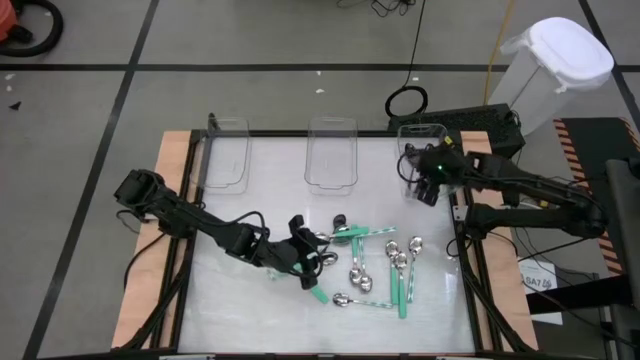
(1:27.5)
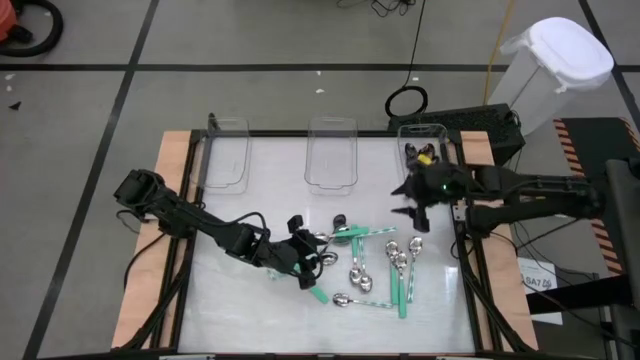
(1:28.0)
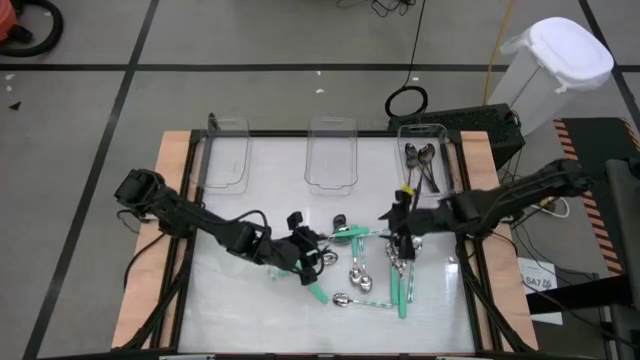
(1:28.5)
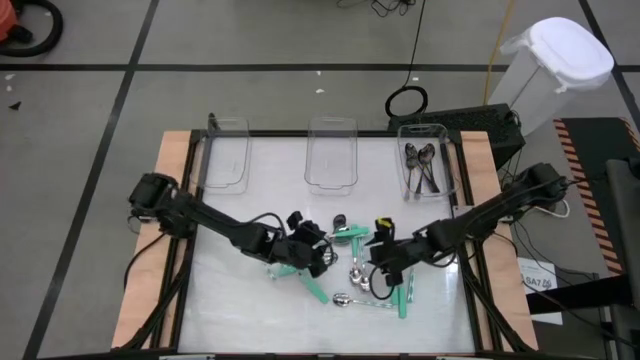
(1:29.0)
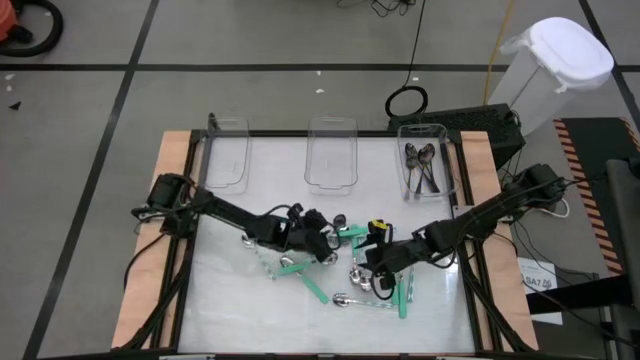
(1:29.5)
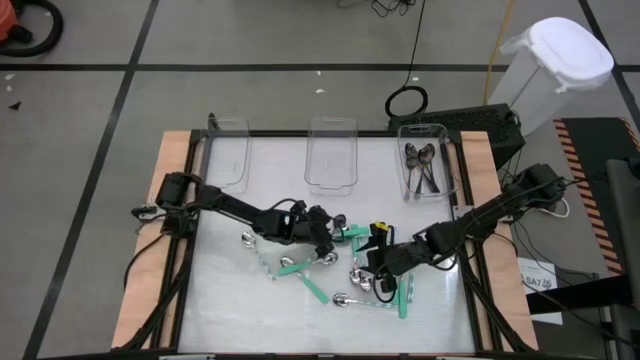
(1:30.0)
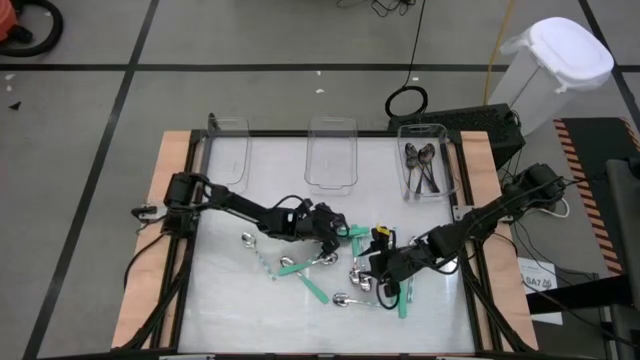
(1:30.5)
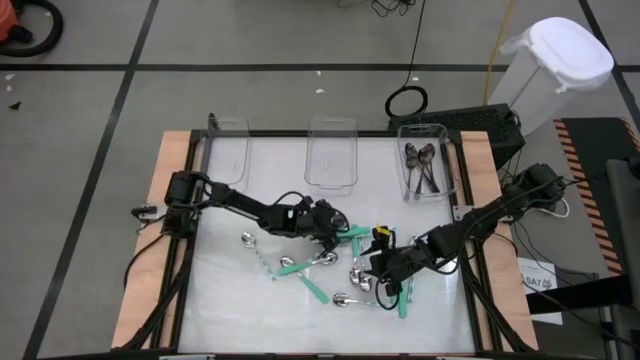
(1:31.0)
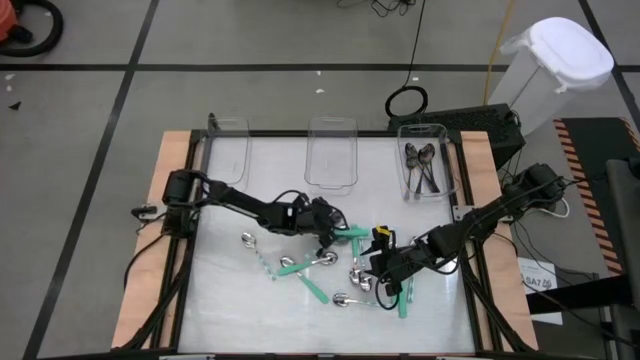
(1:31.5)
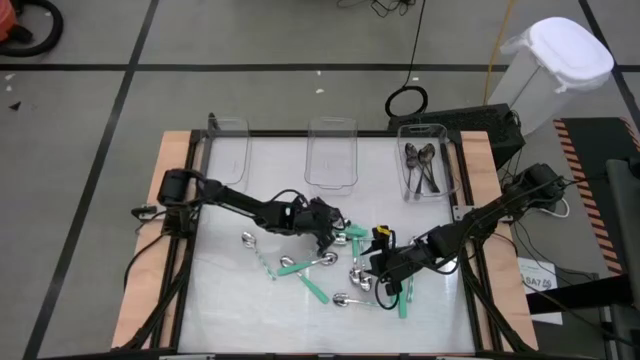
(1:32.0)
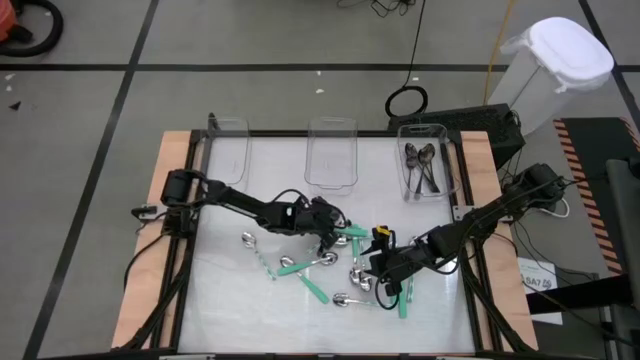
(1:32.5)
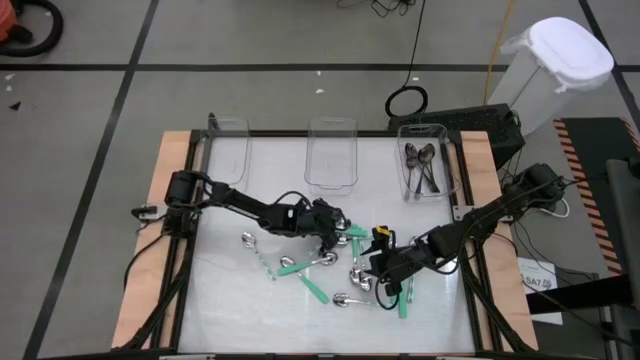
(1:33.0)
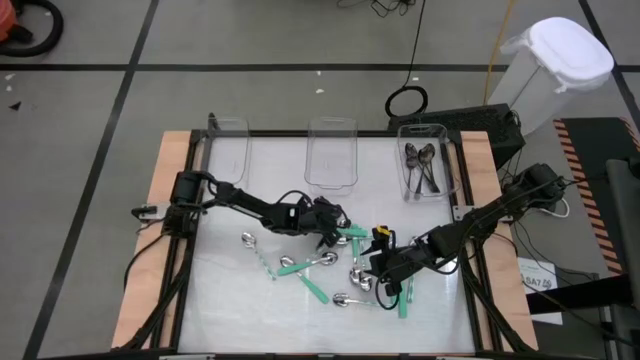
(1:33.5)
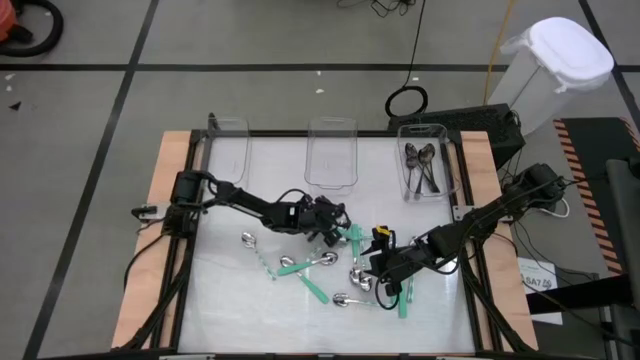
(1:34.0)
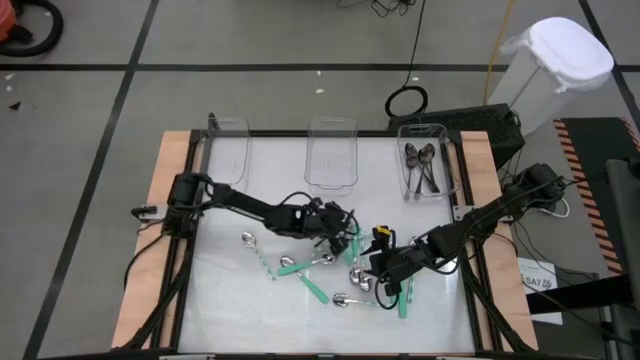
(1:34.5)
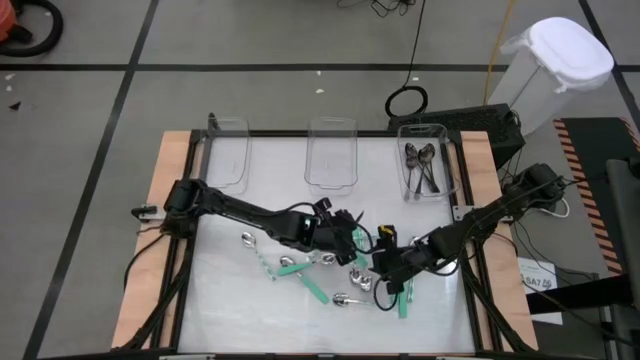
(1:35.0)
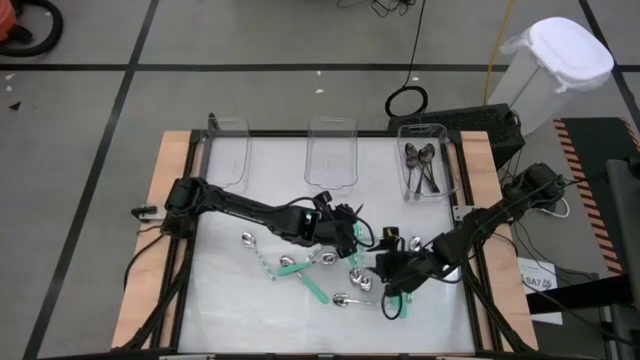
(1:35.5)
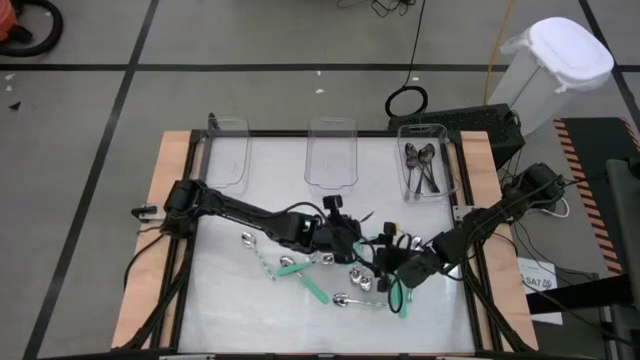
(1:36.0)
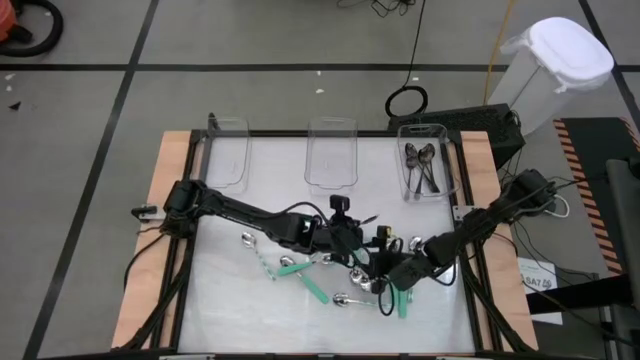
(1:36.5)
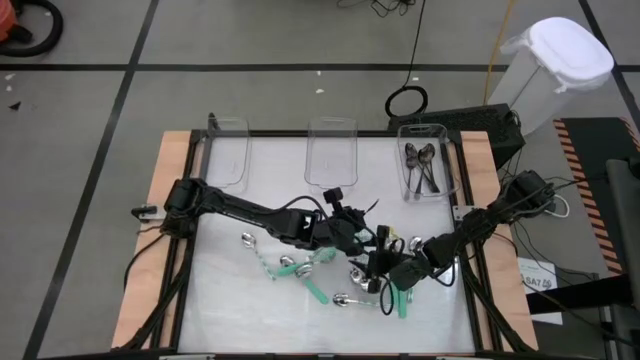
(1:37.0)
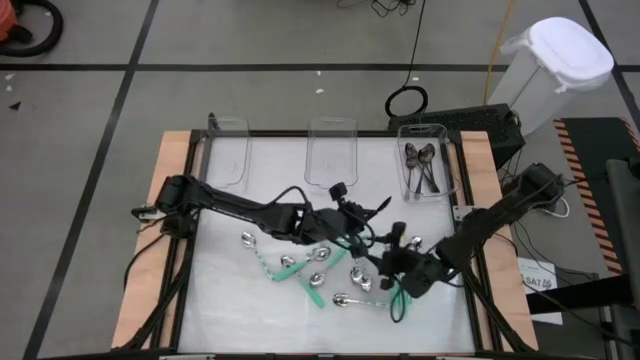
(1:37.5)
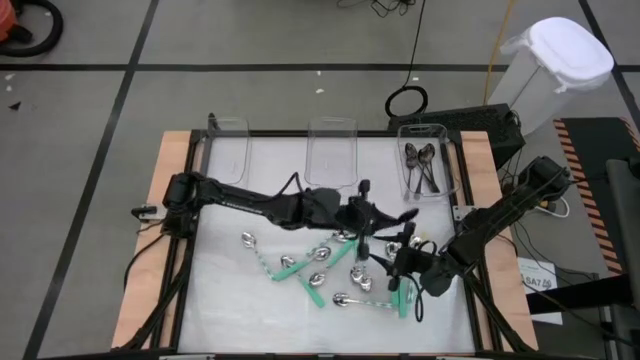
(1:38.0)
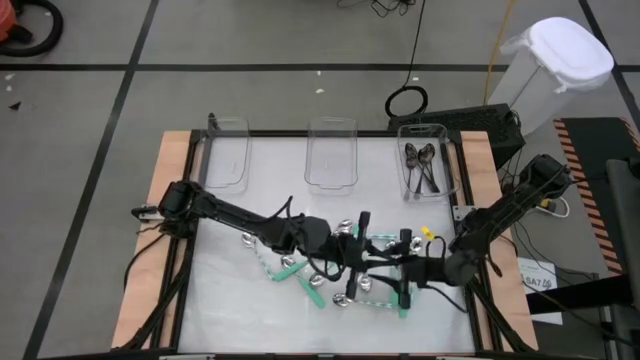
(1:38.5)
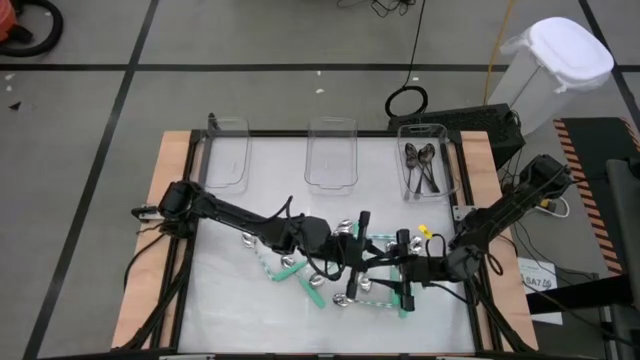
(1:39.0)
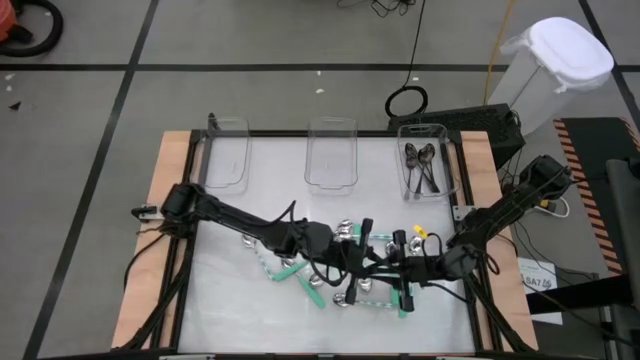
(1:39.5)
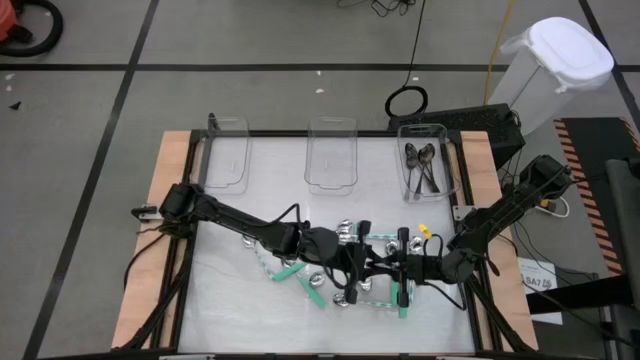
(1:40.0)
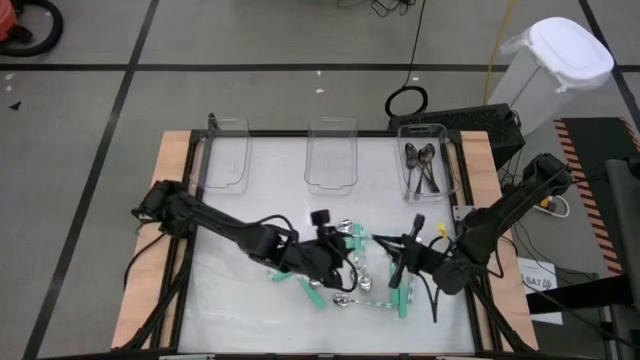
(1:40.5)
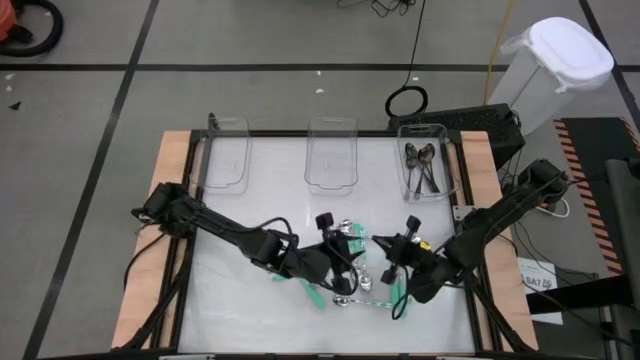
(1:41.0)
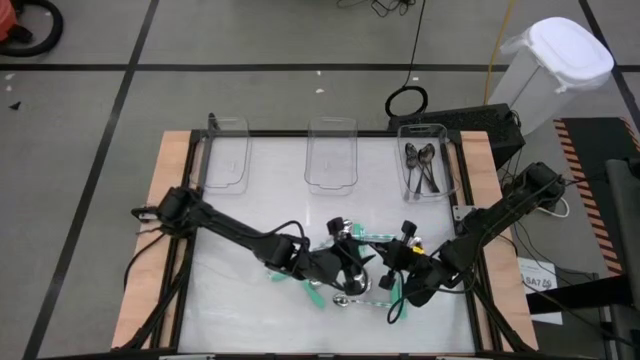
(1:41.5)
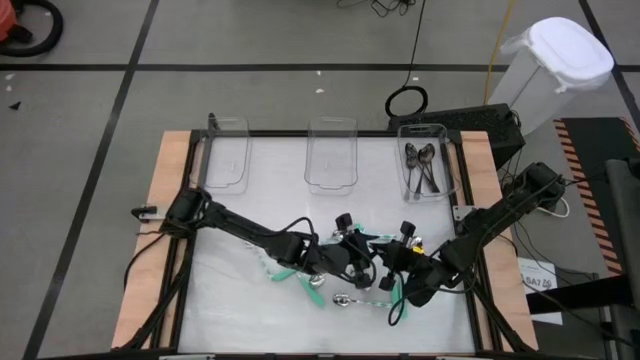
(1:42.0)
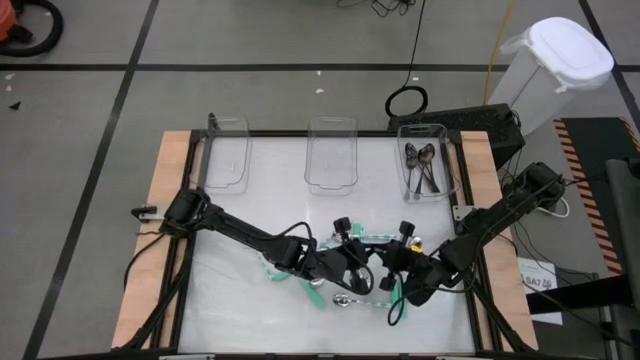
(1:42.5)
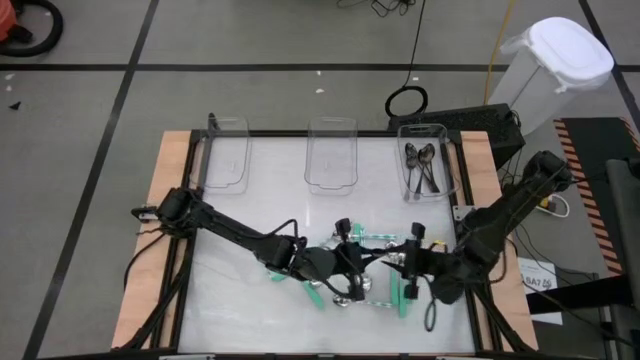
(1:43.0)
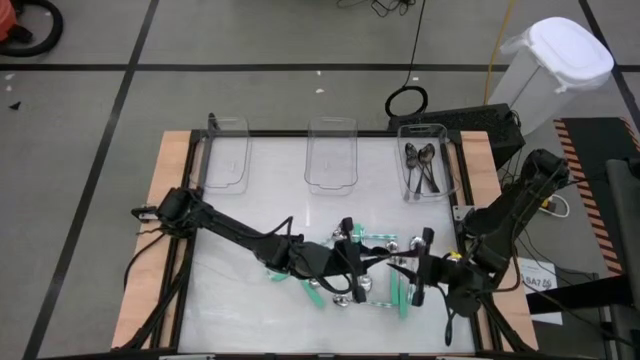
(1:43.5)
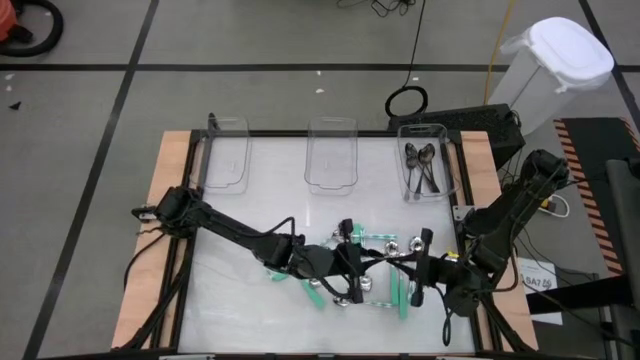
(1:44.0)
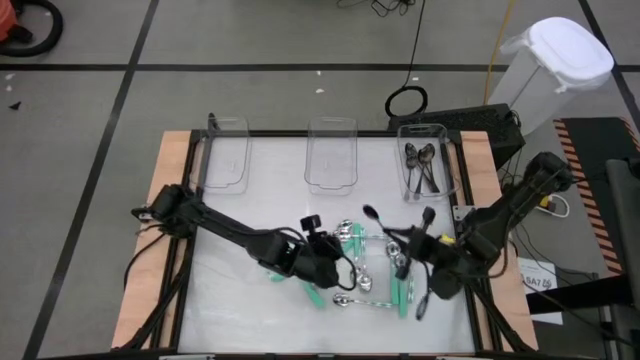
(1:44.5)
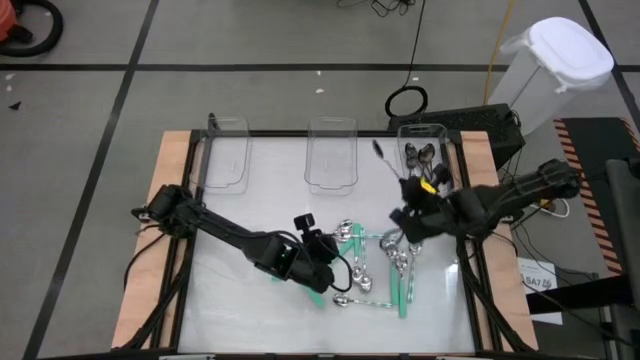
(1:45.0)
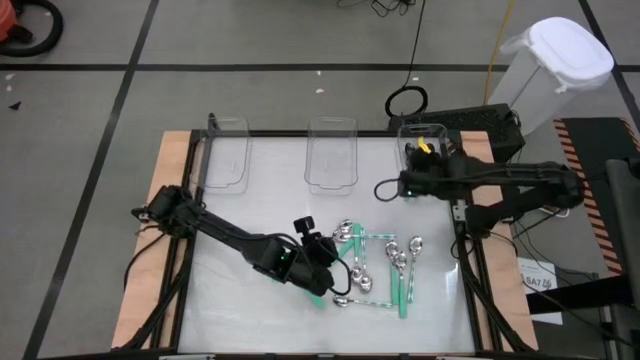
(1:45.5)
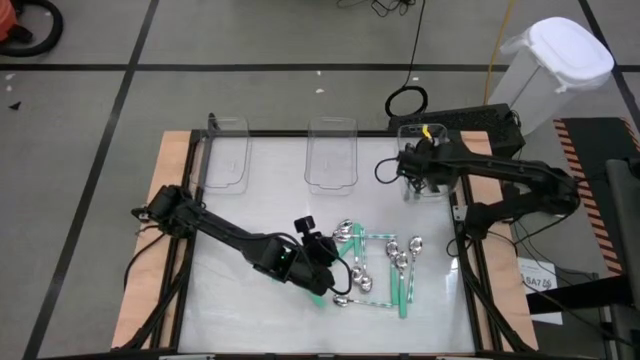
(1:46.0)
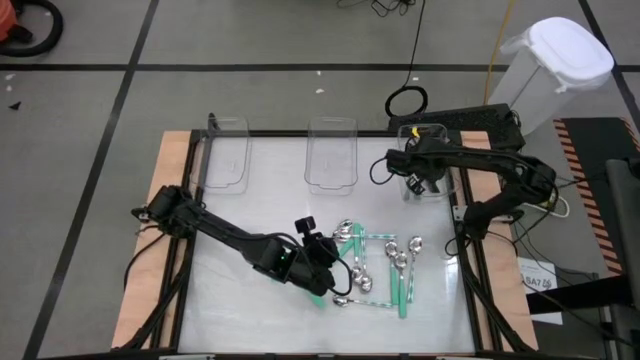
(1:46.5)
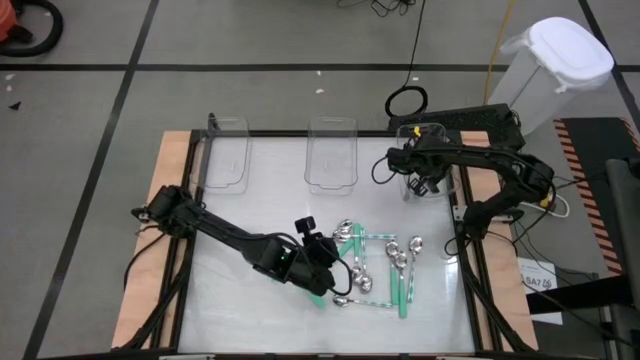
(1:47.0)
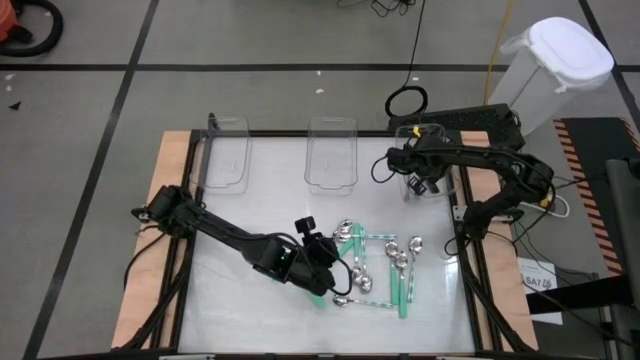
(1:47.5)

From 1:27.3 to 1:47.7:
Task: Sort silverware by color (type)
Put the black spoon into the right transparent bin
